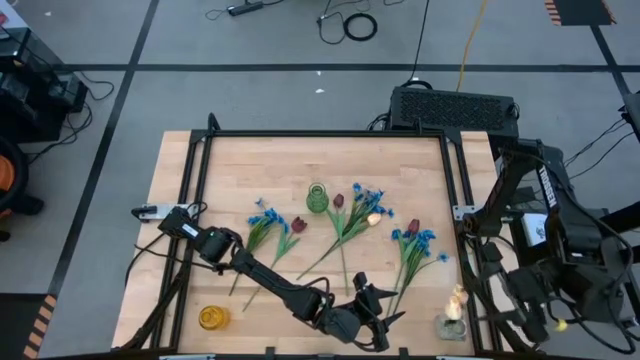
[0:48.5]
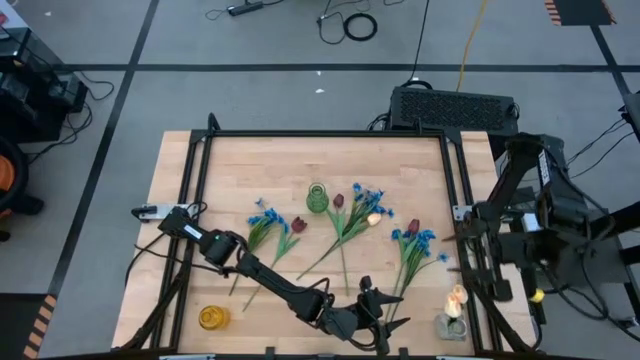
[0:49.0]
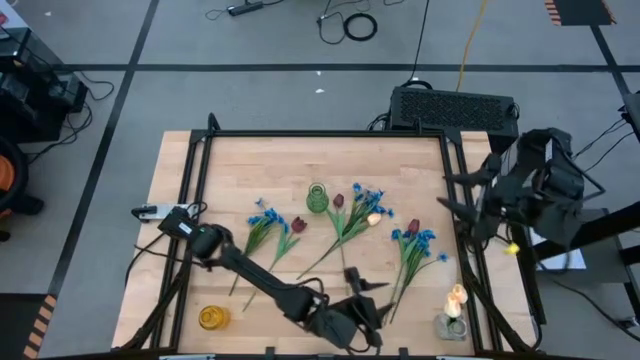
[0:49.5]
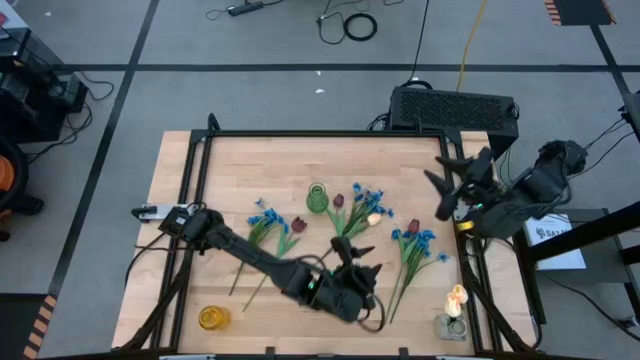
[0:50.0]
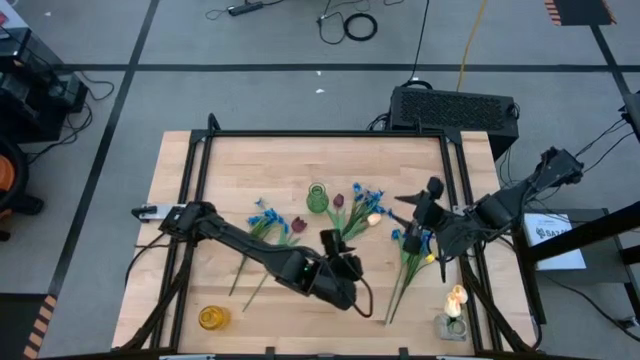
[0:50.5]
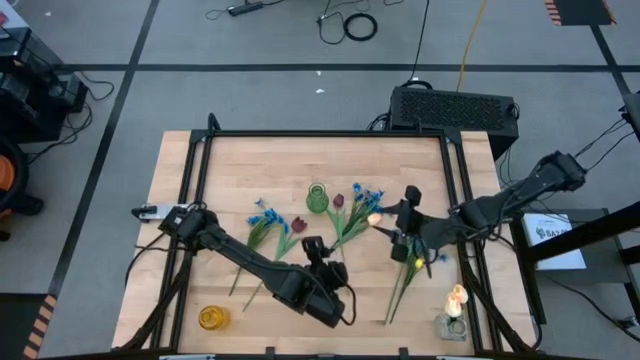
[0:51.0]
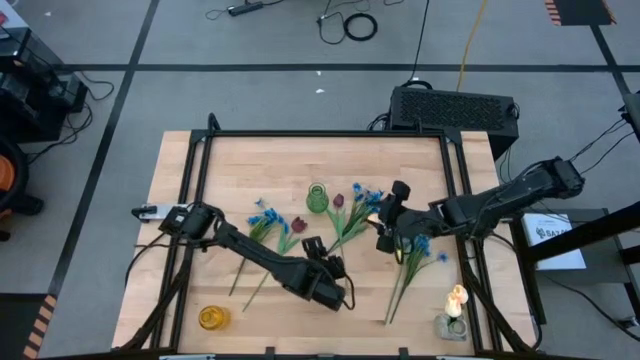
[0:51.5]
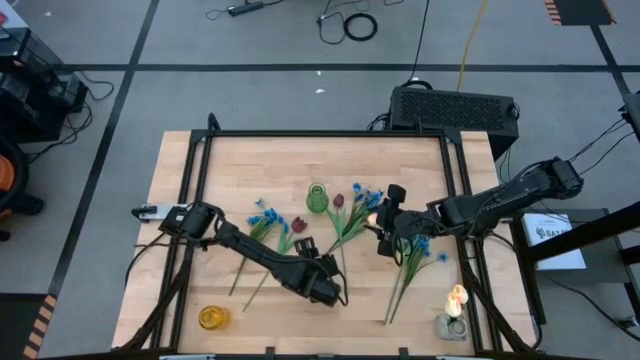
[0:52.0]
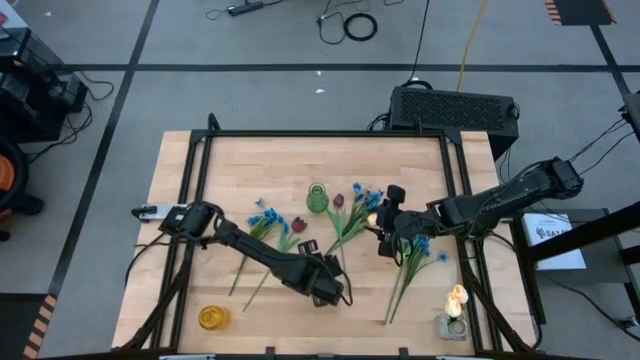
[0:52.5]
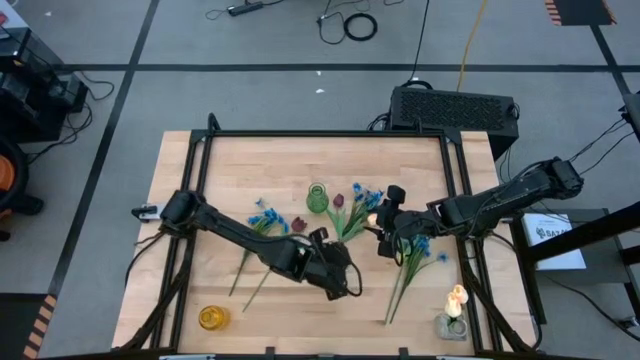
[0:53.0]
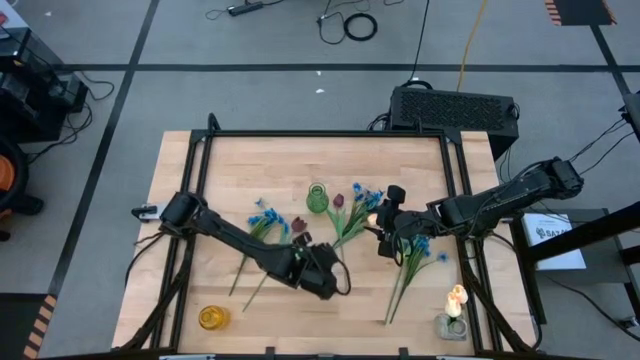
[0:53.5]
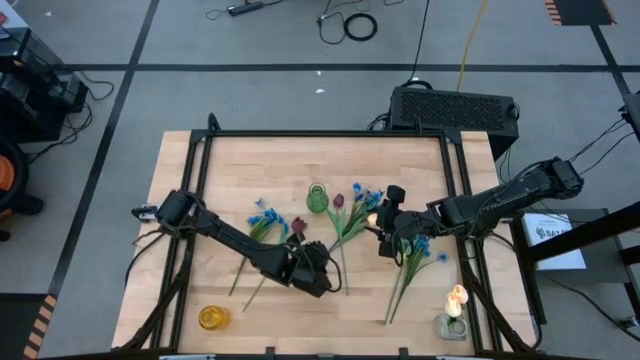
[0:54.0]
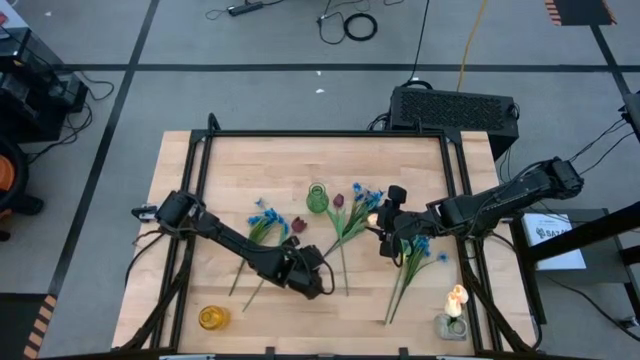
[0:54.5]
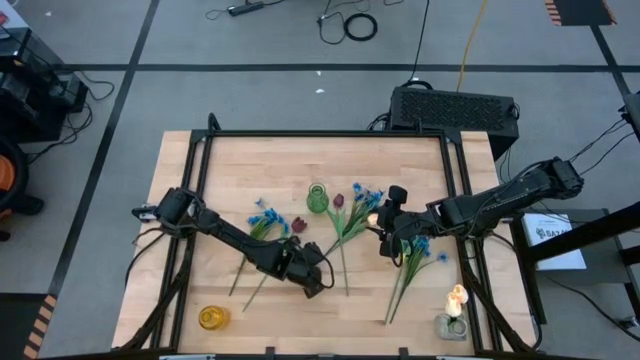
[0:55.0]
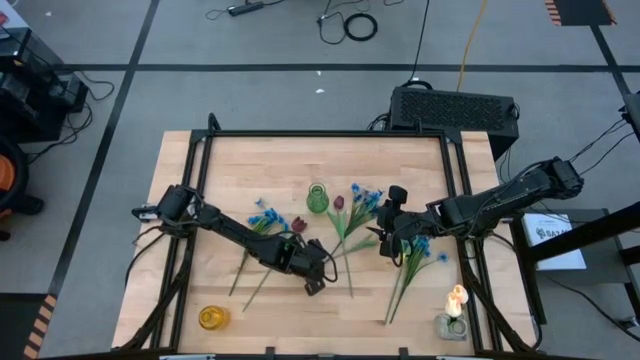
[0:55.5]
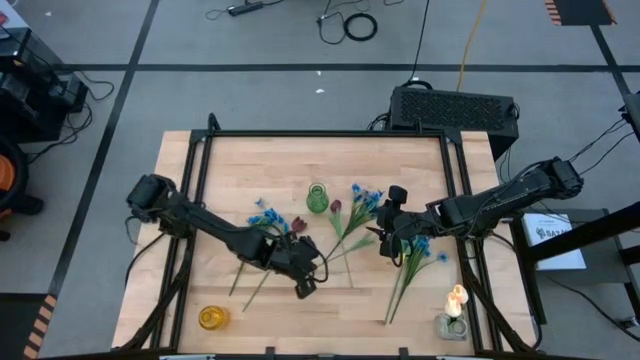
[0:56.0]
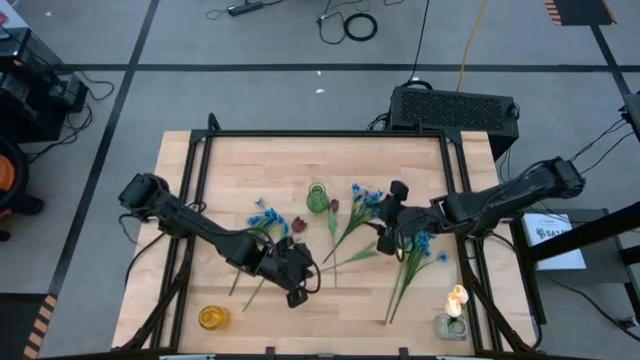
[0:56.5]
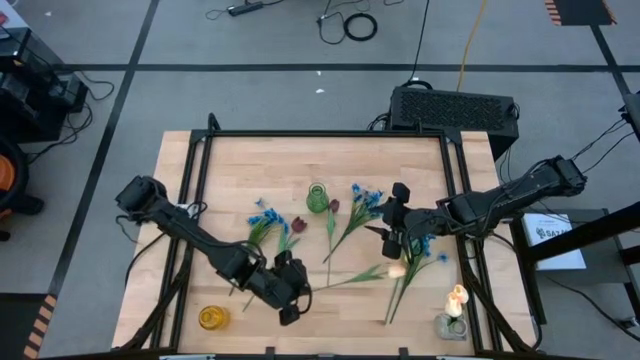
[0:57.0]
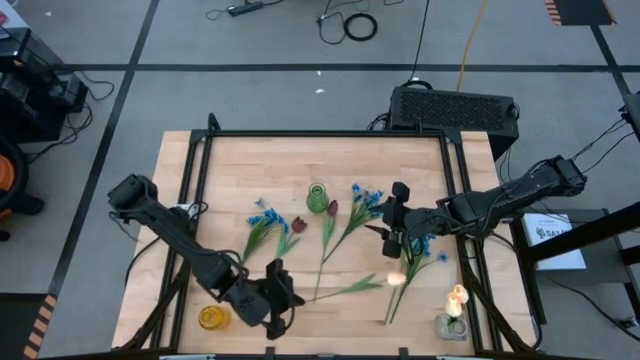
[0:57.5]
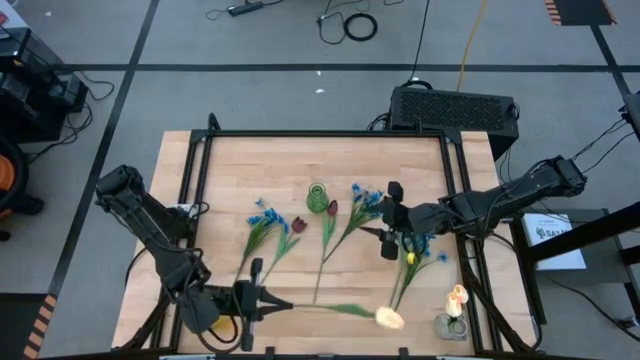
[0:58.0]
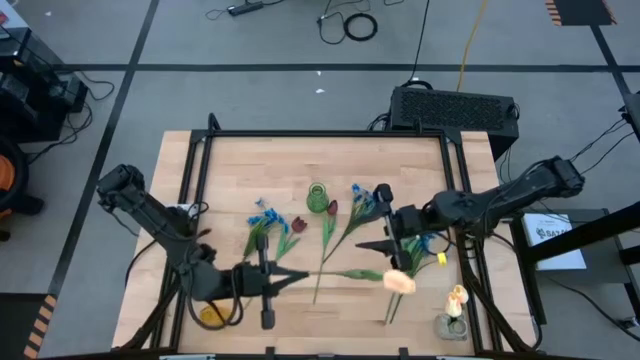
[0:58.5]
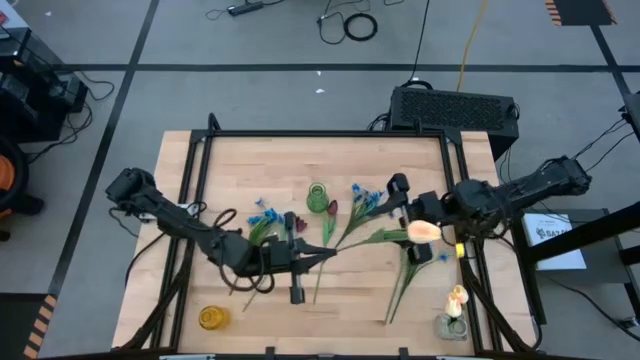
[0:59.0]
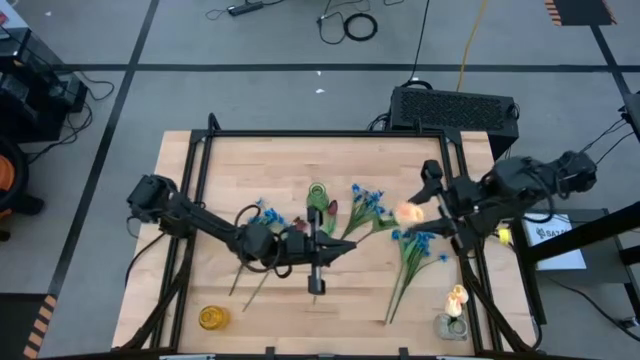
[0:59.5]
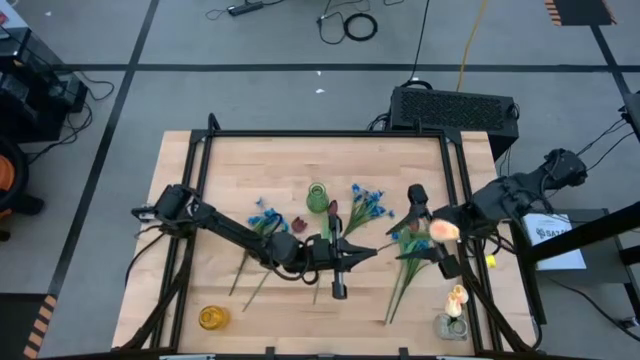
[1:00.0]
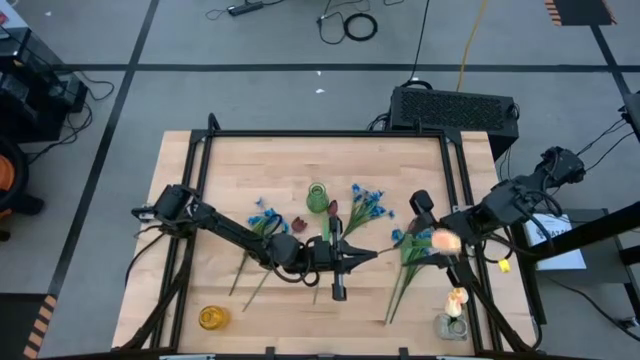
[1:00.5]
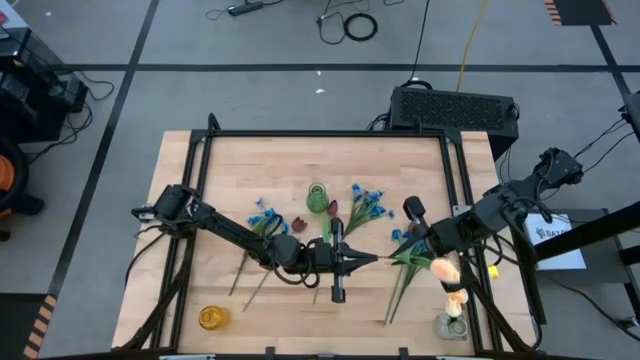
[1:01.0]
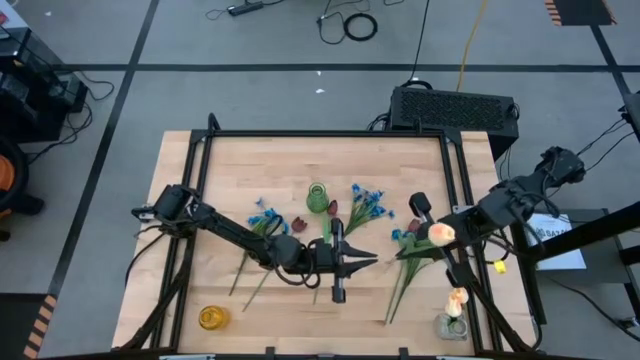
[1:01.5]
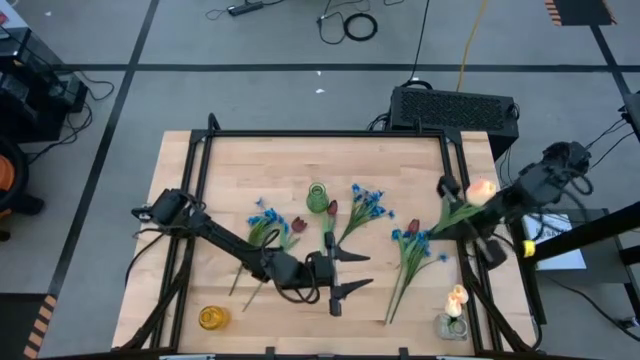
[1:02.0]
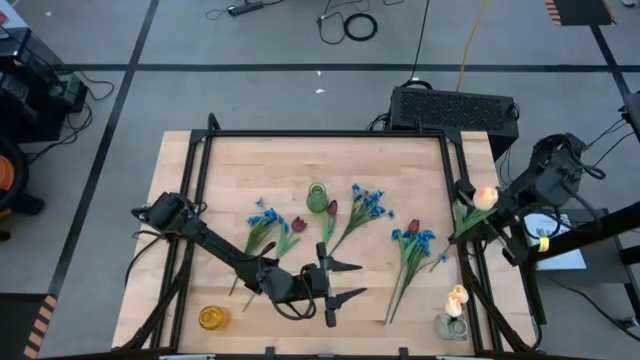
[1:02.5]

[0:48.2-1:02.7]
Task: Sort flowers into vase by color
Put the yellow flower into the transparent vase

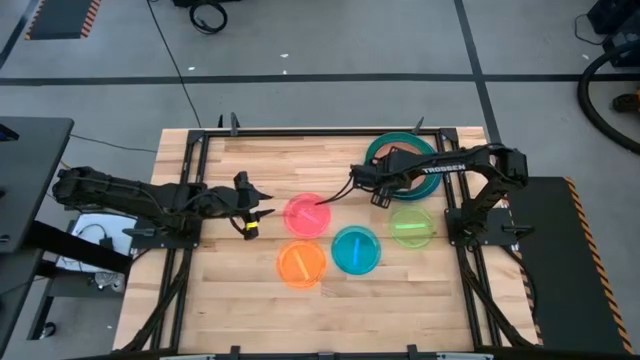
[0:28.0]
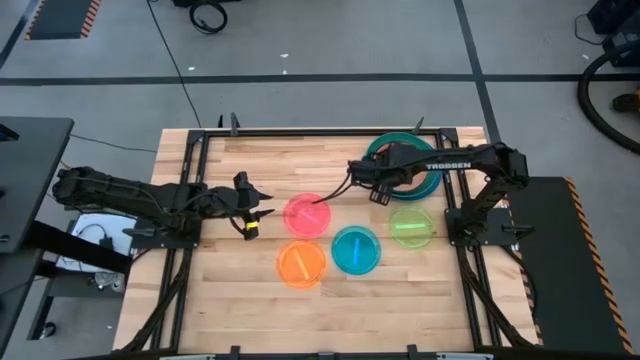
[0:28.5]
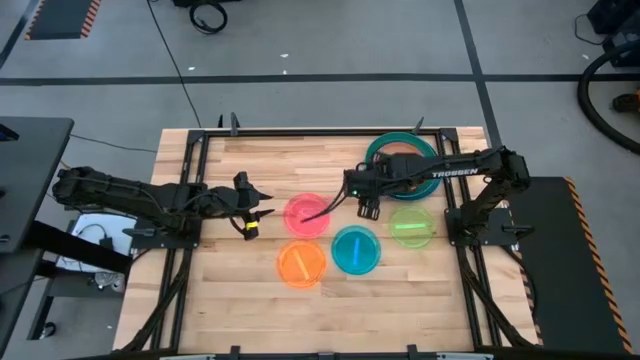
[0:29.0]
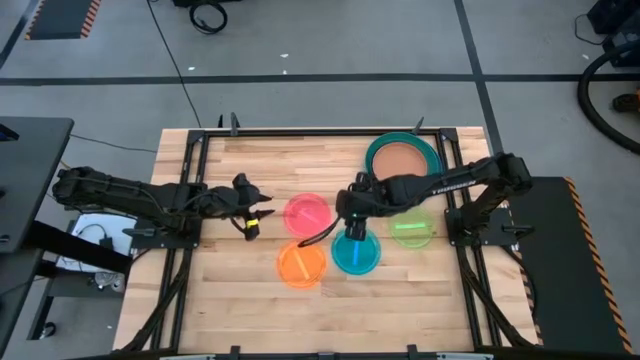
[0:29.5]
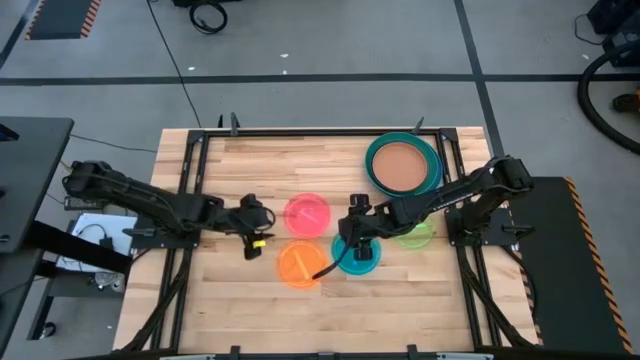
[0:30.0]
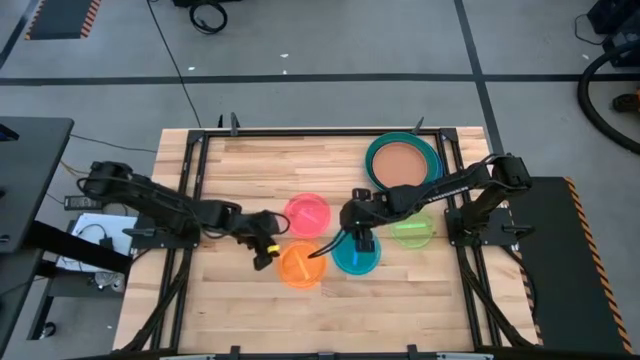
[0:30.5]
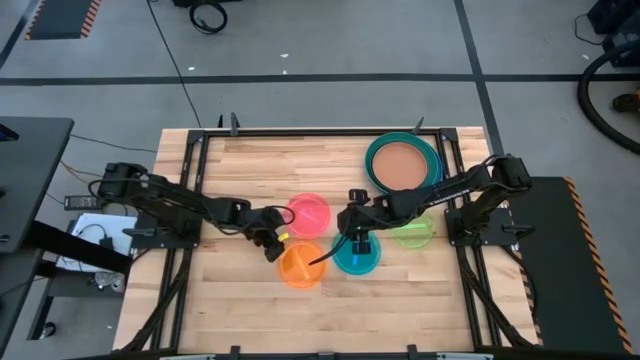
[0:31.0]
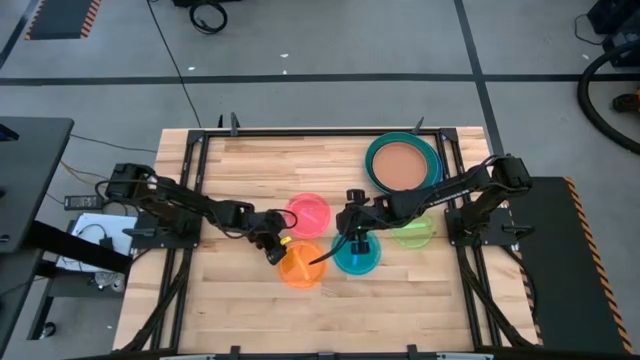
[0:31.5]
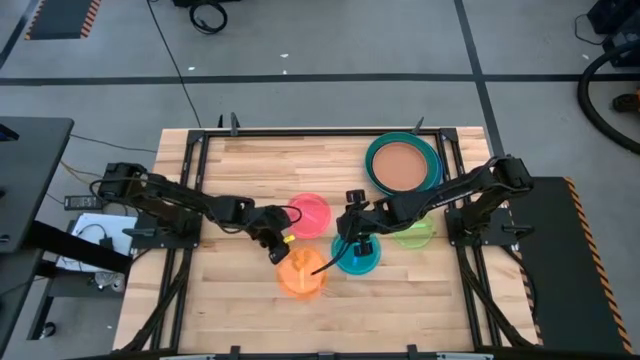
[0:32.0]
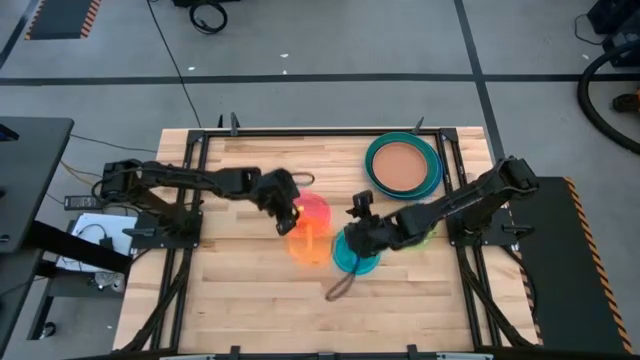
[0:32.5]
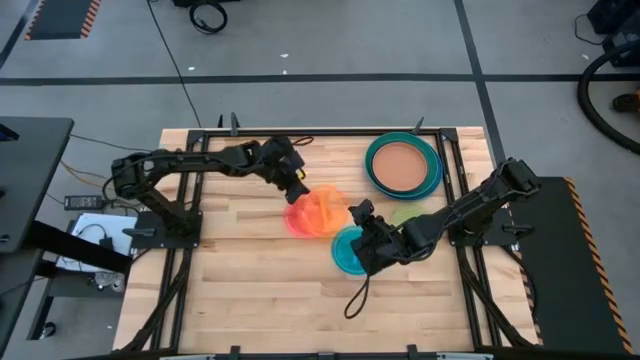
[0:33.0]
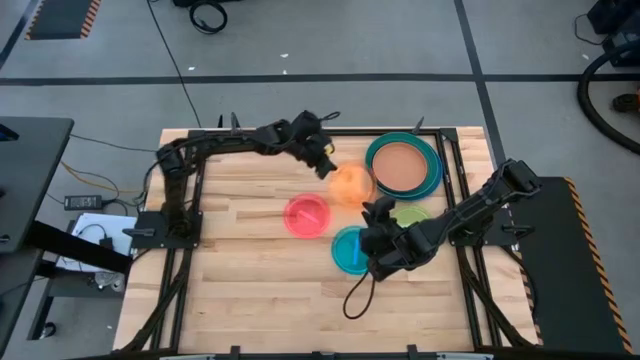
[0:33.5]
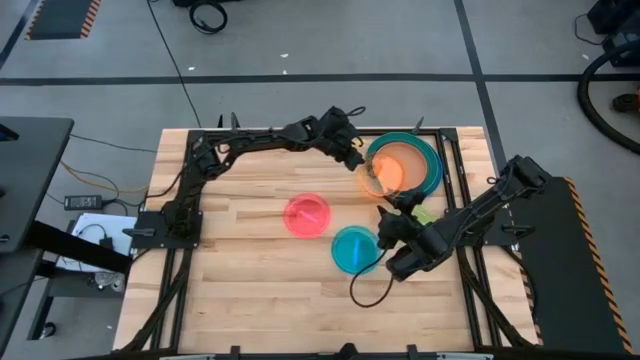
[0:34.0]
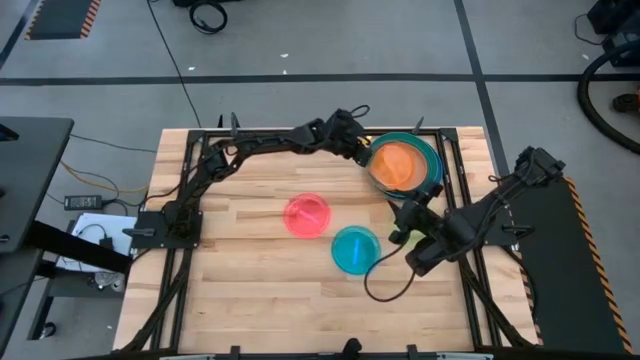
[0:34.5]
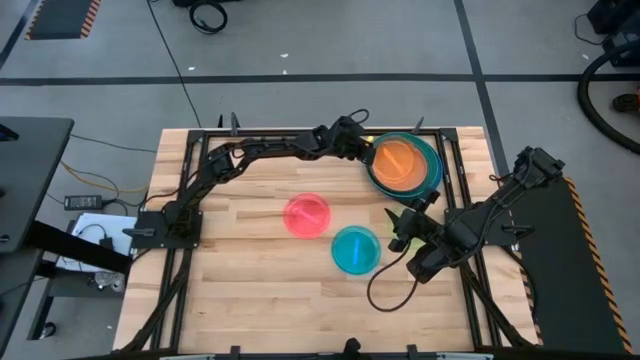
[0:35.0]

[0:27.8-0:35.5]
Task: Stack plastic plates
Stack the orange plate on top of the brown plate
